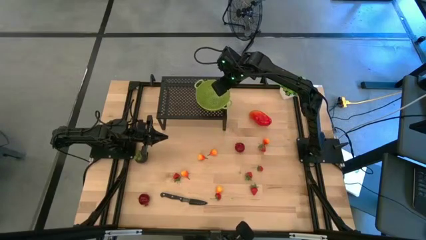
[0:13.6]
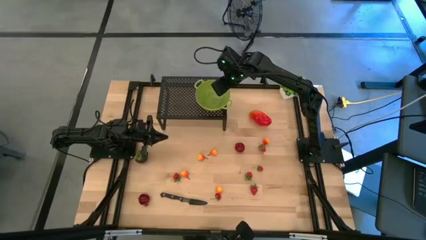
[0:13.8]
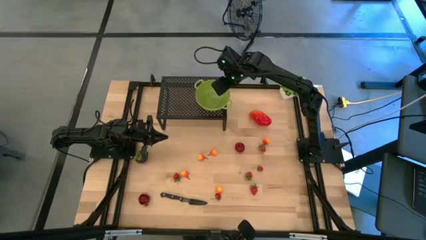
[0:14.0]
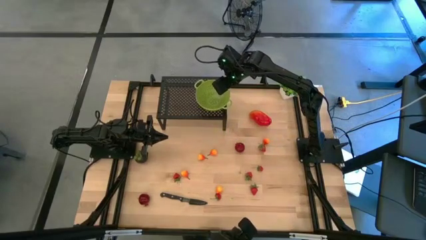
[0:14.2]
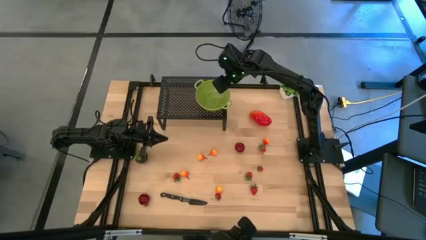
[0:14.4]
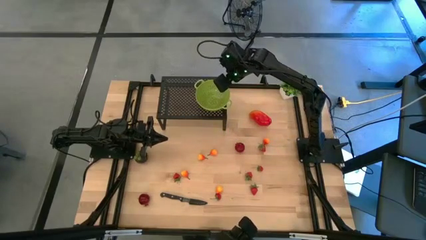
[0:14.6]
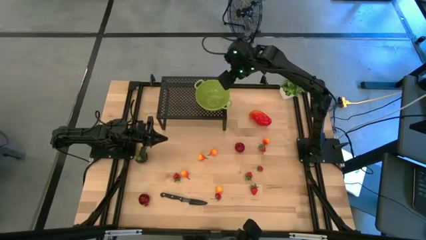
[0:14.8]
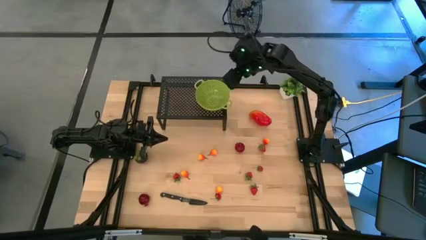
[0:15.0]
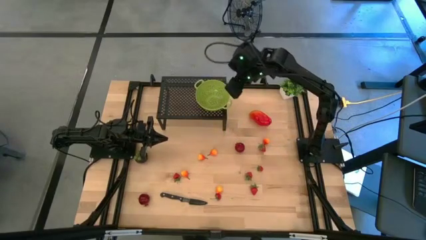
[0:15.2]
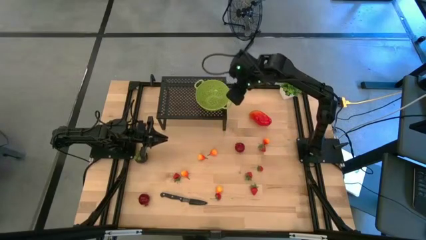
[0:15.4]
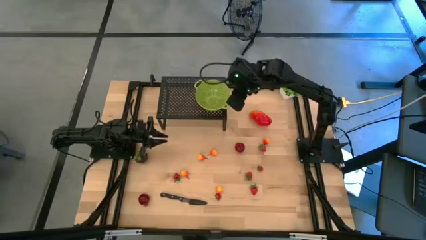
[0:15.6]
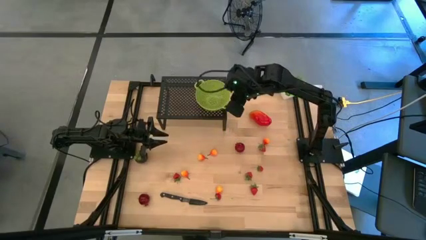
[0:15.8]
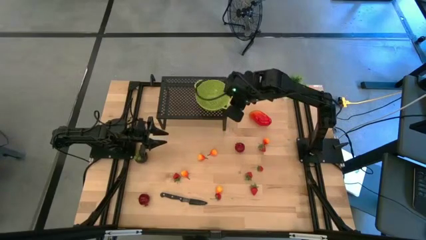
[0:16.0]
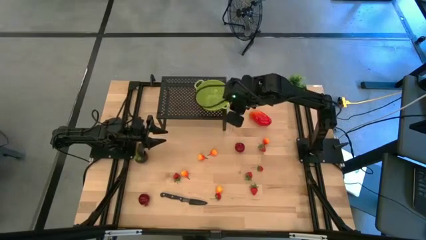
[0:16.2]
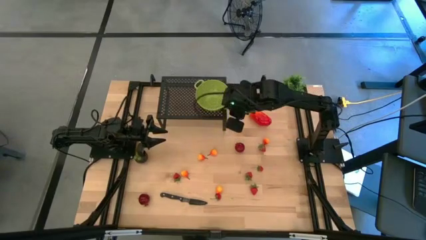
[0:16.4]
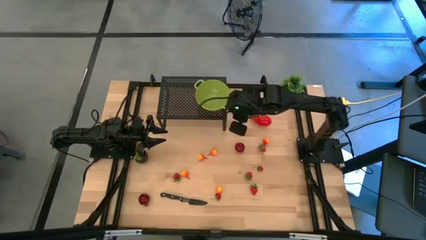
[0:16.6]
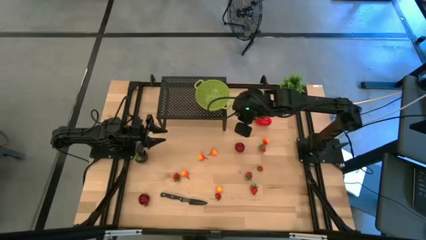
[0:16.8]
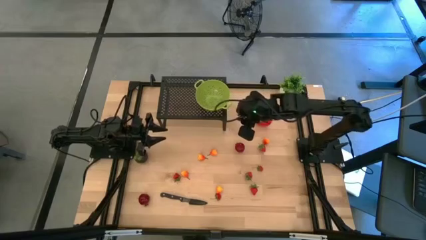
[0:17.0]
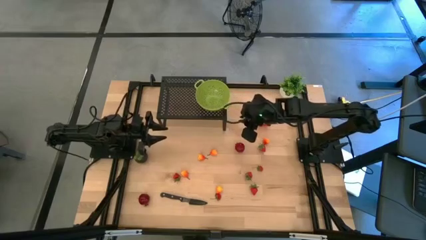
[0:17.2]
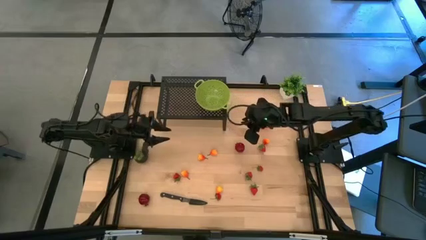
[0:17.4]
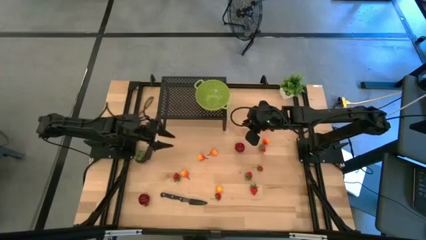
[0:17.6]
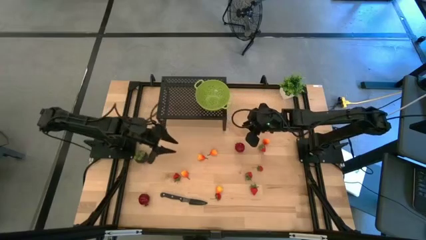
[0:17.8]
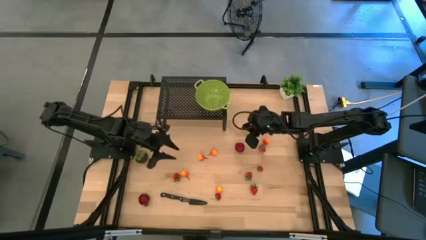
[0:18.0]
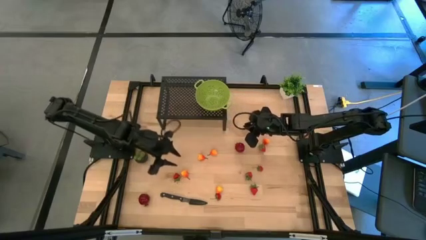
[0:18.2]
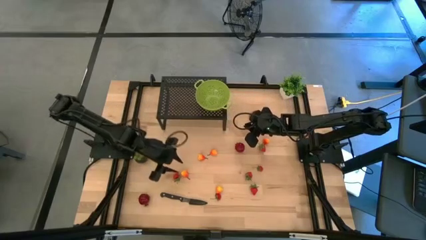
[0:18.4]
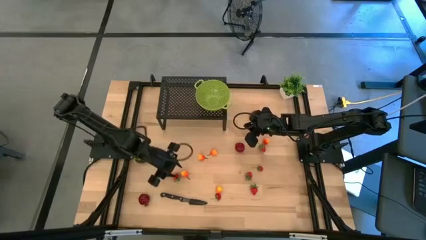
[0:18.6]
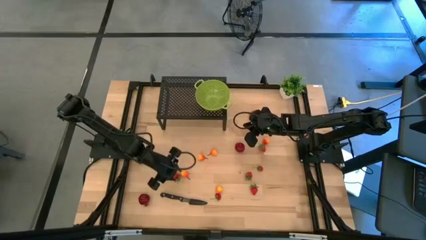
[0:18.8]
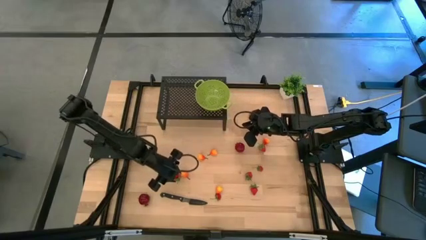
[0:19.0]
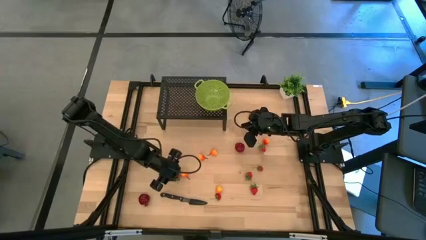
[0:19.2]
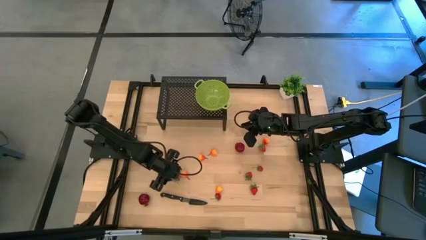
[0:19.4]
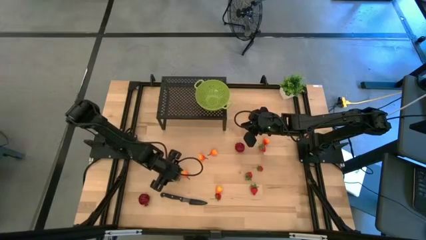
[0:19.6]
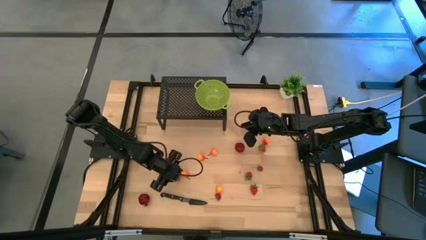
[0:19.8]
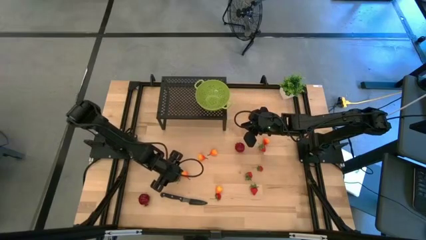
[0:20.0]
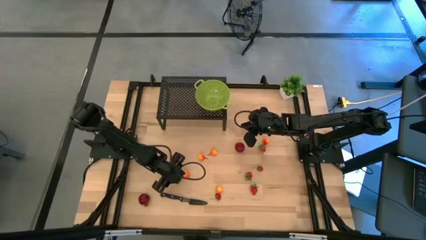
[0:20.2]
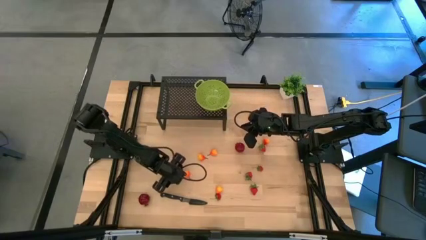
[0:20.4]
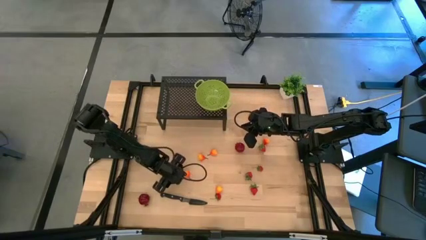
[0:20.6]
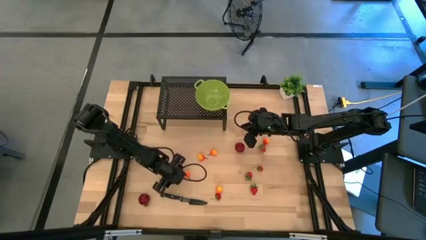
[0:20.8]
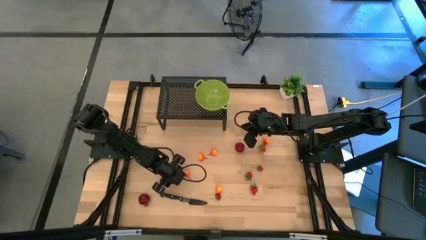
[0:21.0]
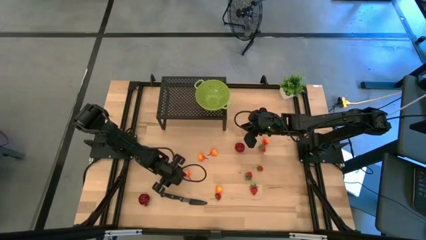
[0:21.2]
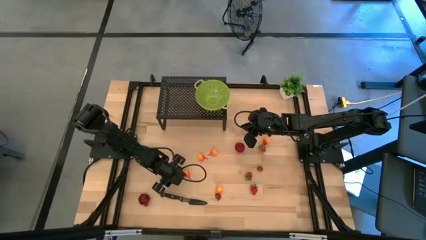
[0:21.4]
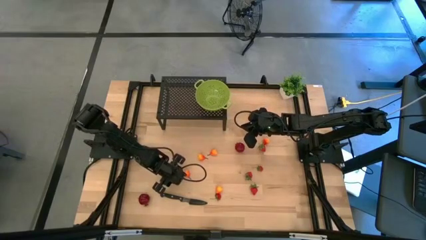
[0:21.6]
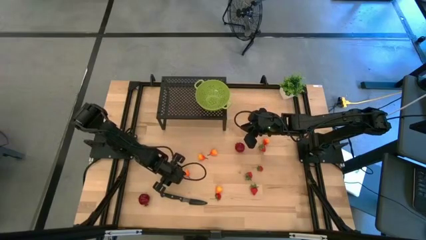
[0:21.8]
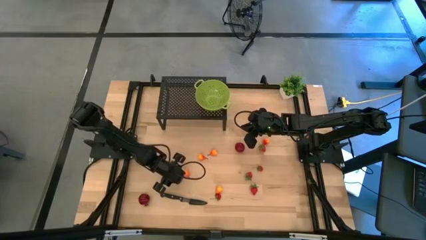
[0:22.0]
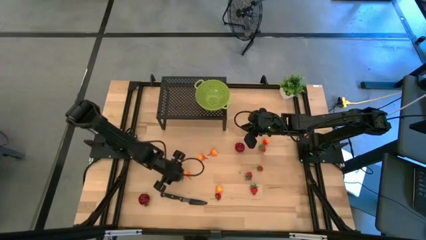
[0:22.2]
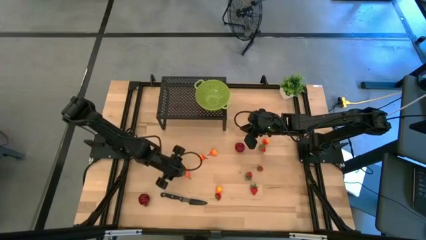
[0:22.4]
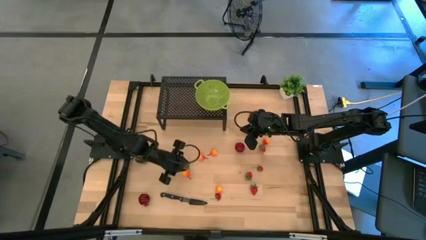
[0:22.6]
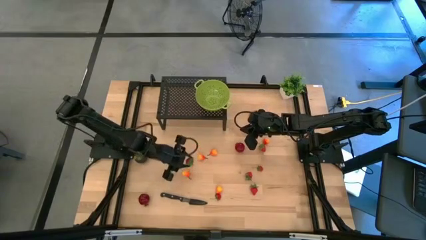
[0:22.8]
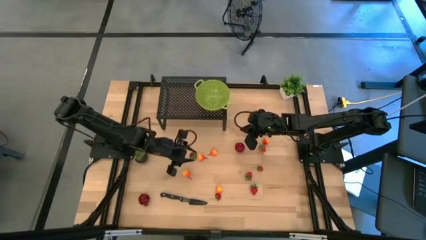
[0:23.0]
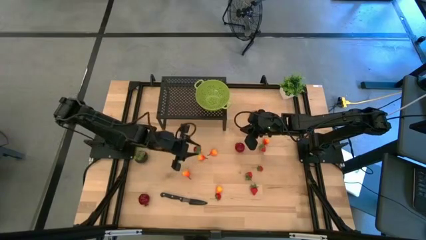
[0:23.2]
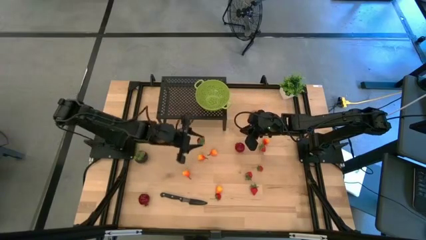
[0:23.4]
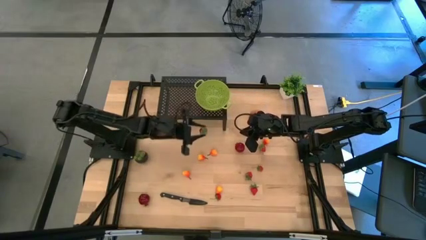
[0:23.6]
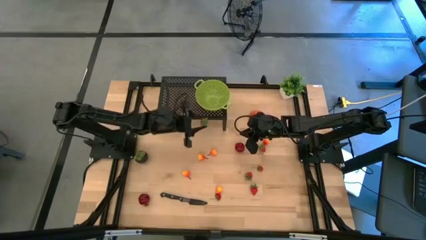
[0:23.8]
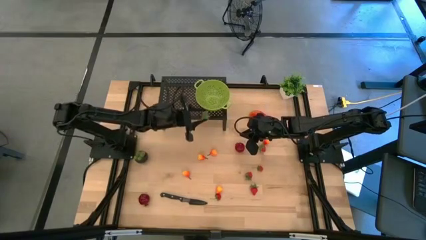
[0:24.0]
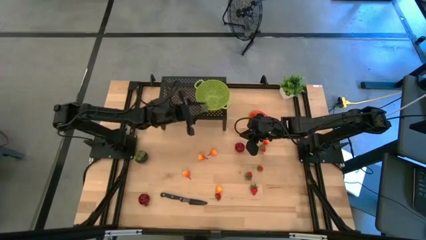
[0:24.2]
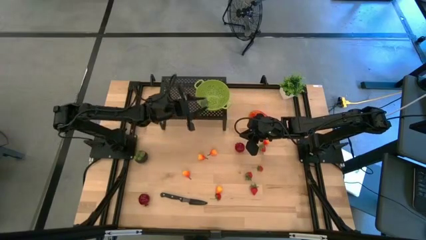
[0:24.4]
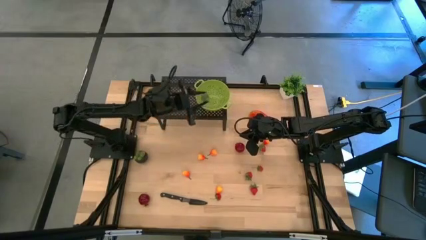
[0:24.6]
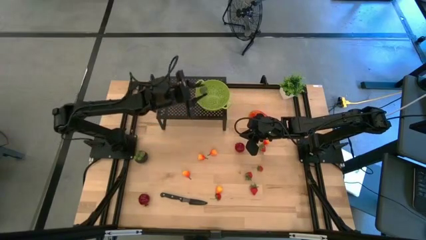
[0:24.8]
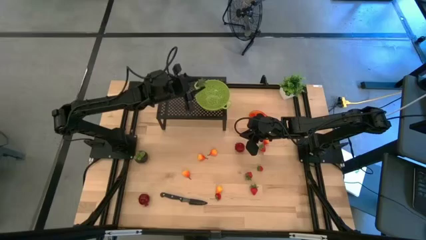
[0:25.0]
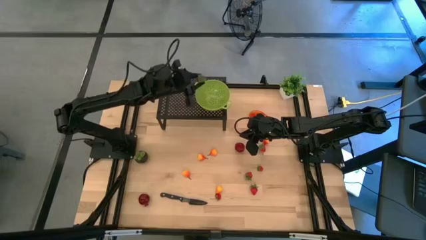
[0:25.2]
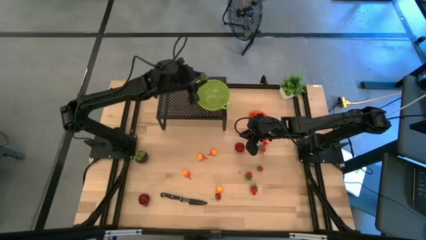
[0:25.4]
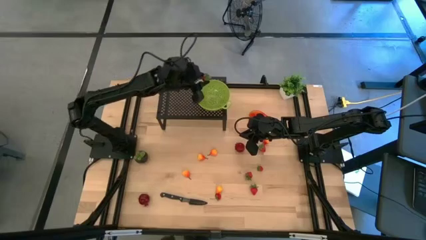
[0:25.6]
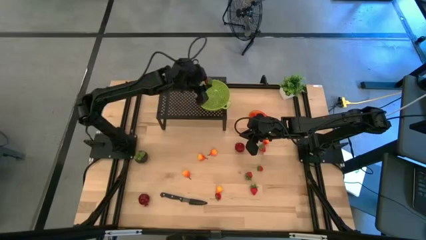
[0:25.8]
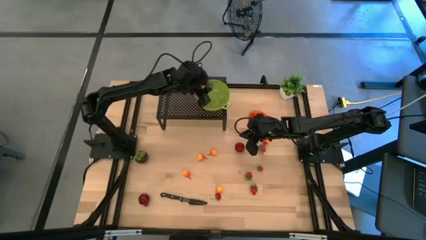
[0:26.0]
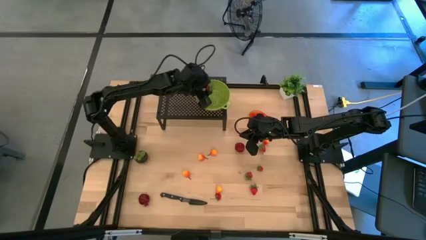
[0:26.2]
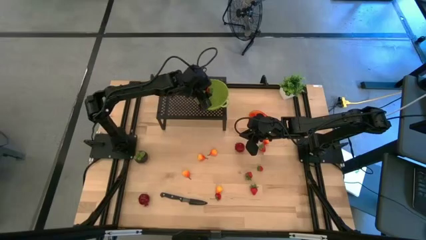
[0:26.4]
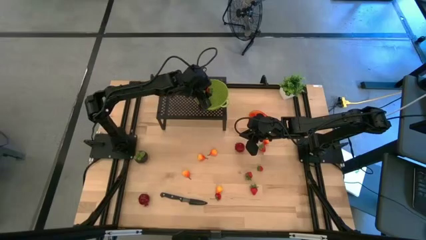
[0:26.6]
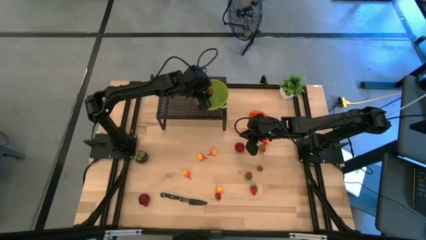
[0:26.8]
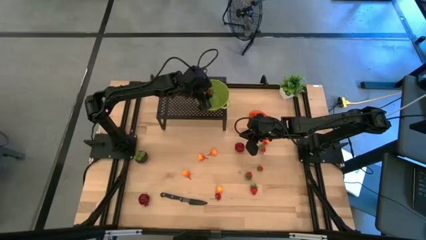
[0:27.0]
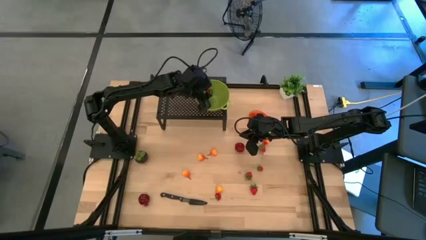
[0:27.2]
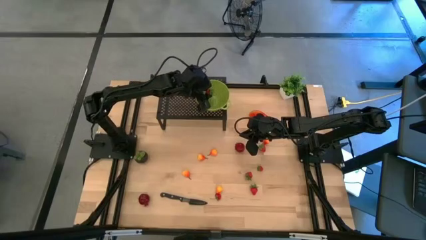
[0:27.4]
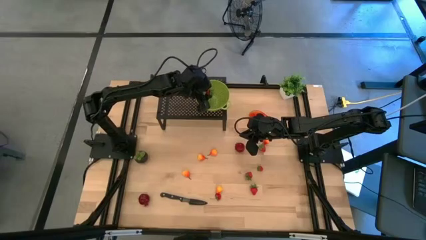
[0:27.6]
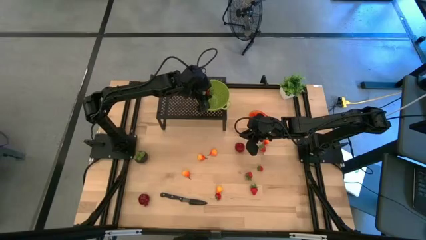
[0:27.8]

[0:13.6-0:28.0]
Task: Pick & Place Fruit
Put the strawberry into the green strainer bowl on the shelf

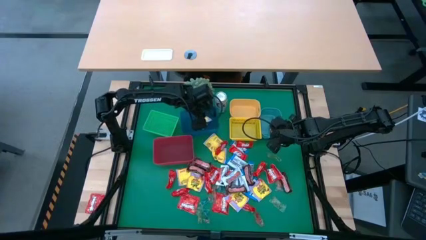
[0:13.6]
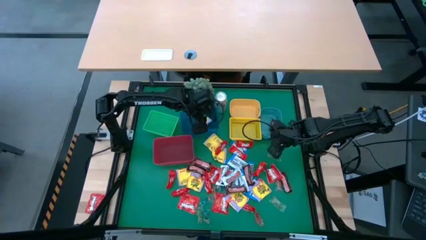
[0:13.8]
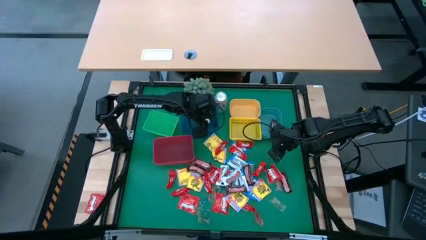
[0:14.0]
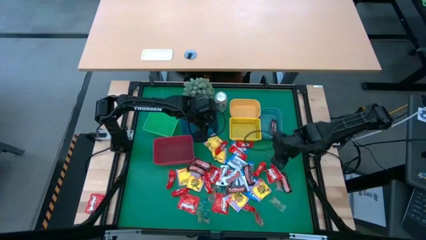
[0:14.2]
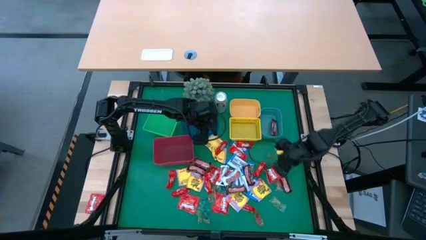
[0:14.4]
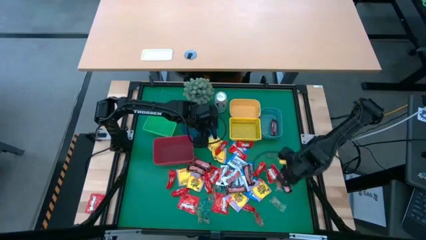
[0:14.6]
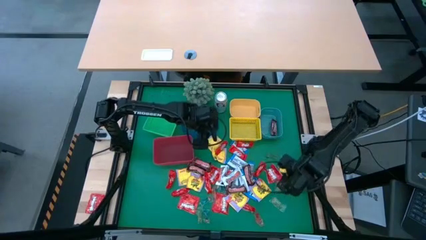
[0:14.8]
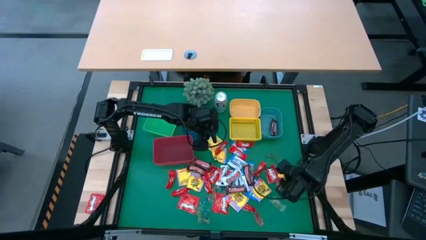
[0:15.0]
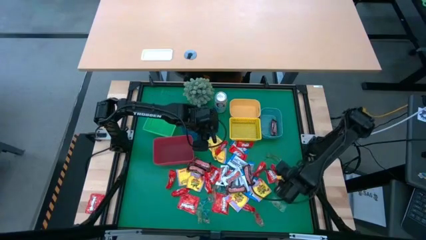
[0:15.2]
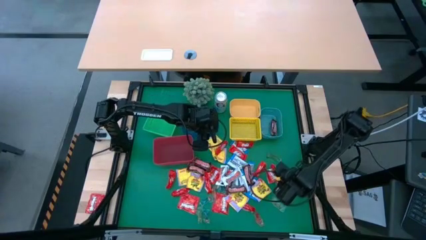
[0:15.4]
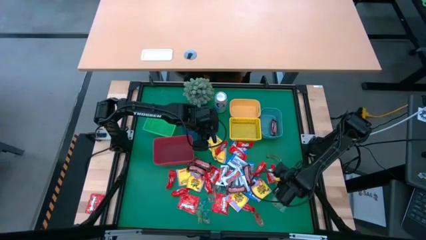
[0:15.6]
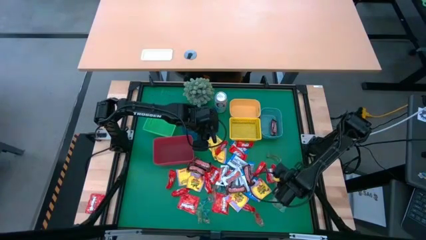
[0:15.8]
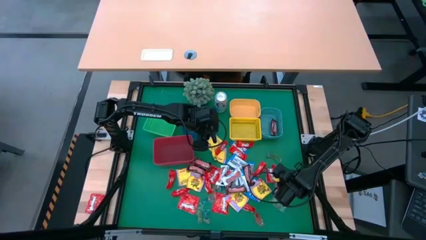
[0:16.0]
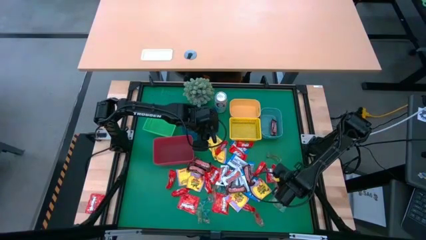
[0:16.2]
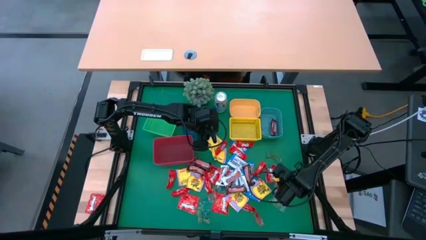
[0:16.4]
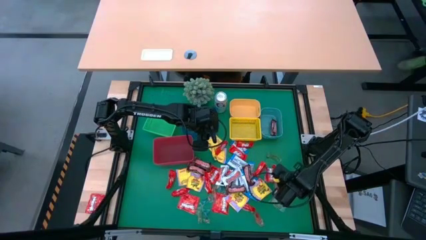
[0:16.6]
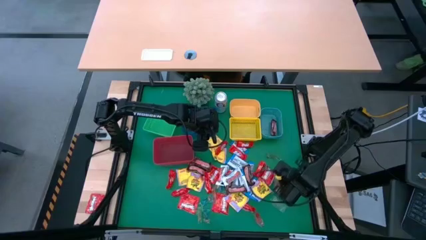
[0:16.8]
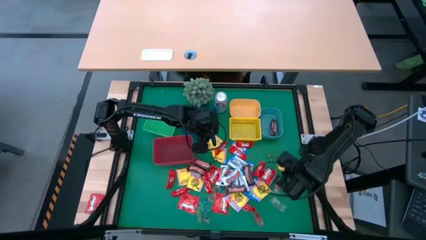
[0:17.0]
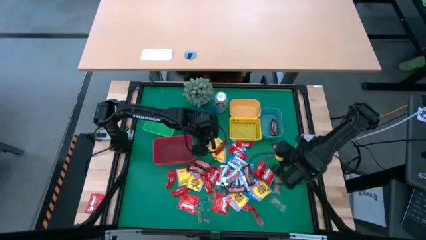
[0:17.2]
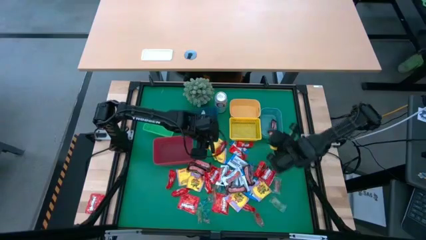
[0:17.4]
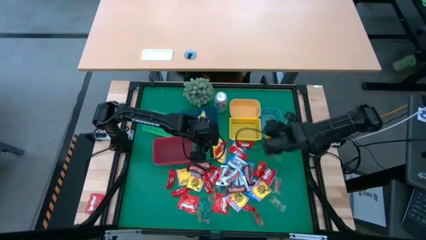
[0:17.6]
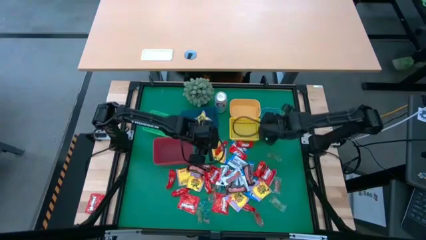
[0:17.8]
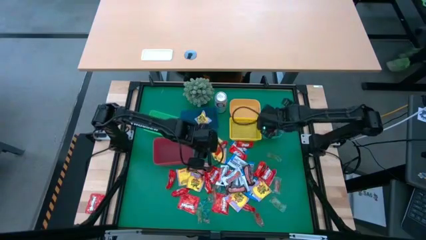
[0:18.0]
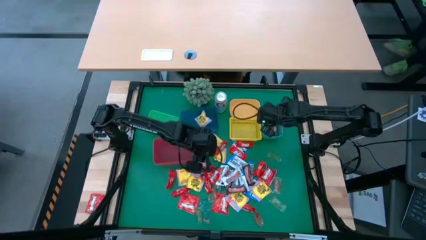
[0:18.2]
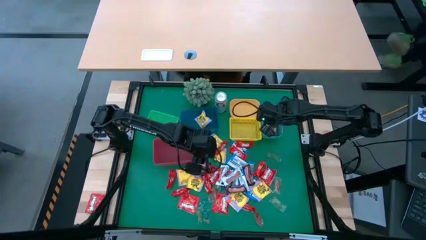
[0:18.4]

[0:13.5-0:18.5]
Task: Sort candy
Put the brown candy bar into the green bin
